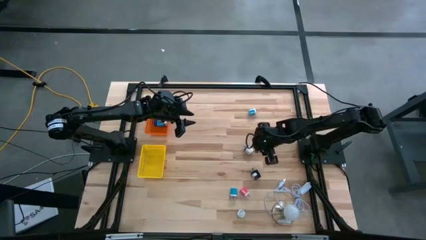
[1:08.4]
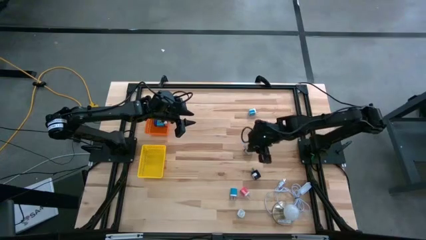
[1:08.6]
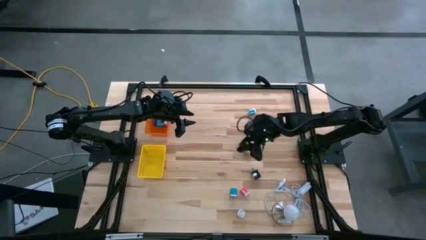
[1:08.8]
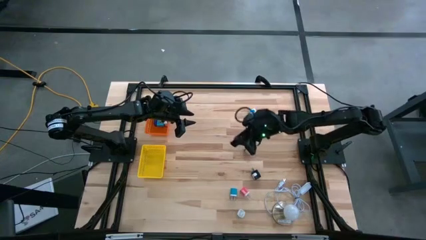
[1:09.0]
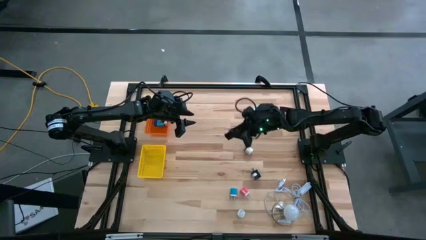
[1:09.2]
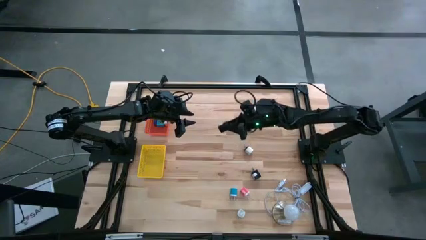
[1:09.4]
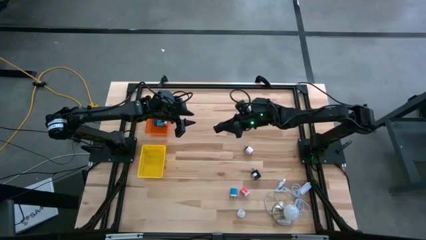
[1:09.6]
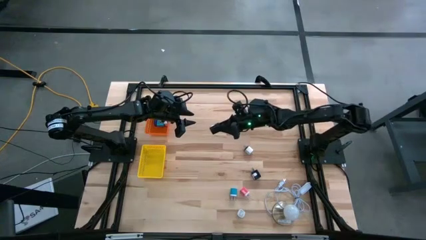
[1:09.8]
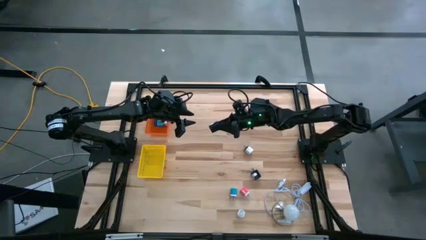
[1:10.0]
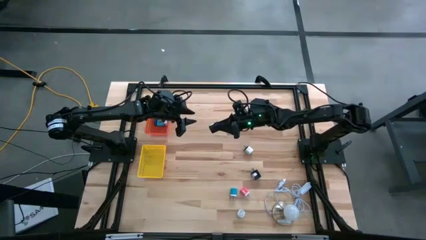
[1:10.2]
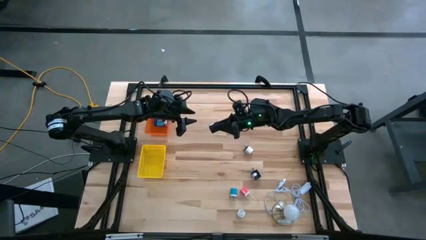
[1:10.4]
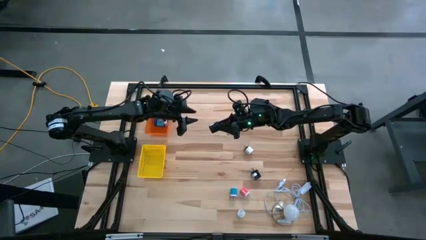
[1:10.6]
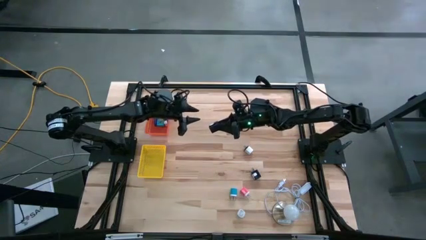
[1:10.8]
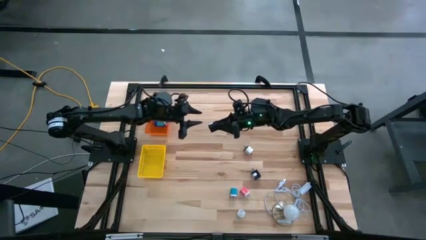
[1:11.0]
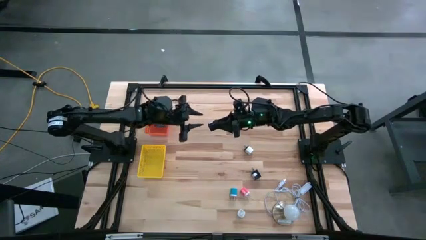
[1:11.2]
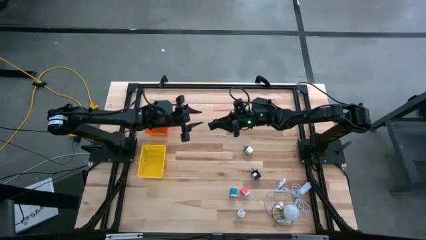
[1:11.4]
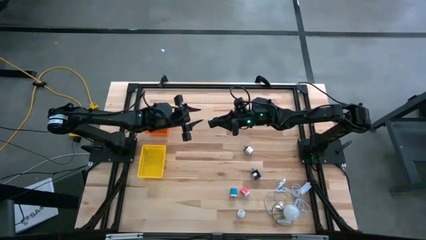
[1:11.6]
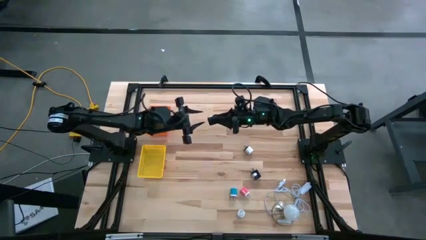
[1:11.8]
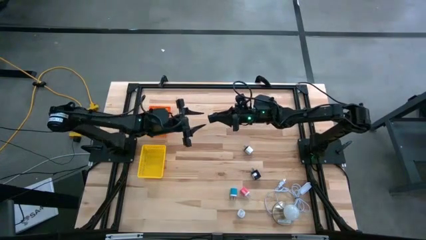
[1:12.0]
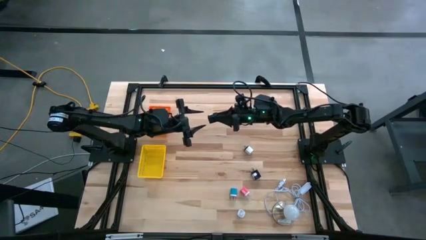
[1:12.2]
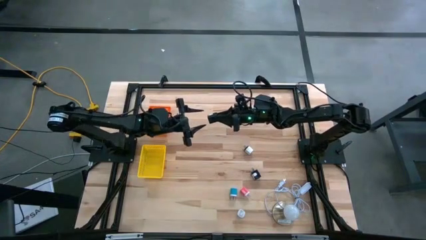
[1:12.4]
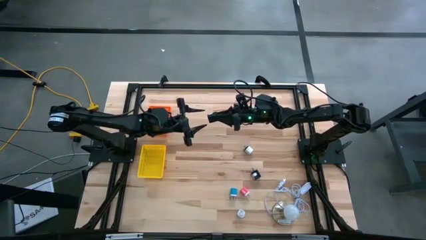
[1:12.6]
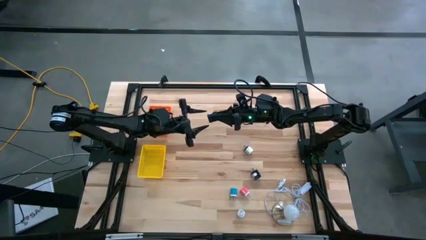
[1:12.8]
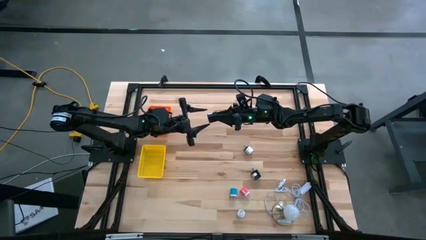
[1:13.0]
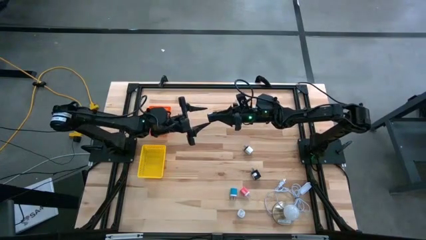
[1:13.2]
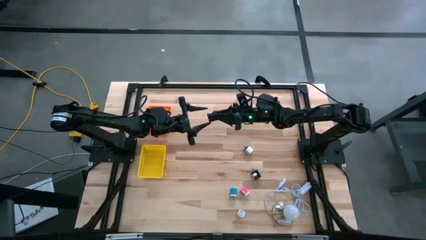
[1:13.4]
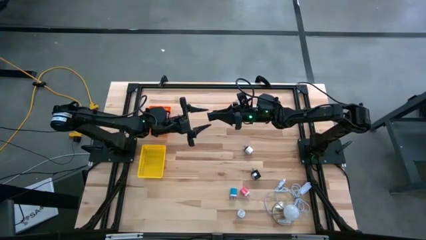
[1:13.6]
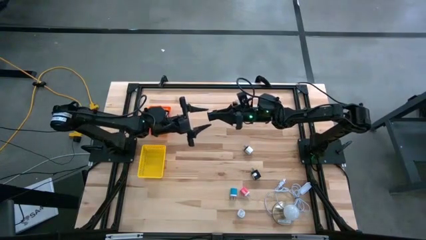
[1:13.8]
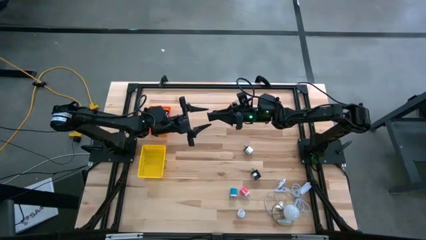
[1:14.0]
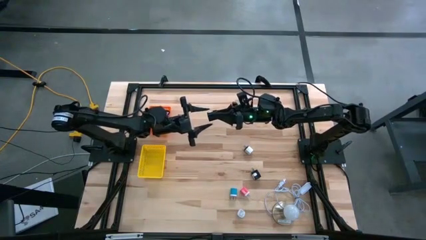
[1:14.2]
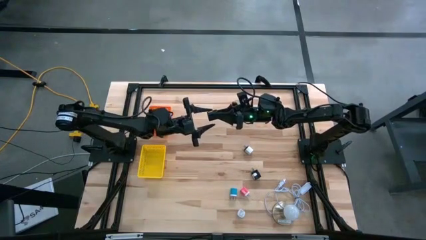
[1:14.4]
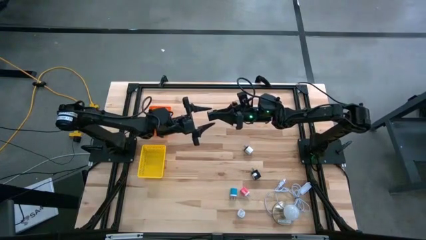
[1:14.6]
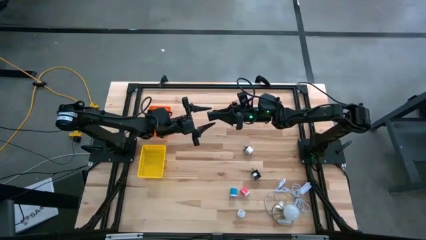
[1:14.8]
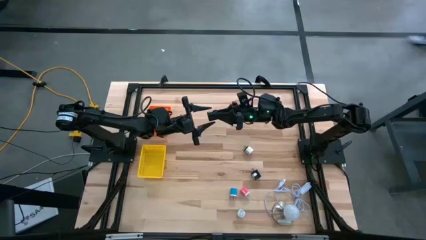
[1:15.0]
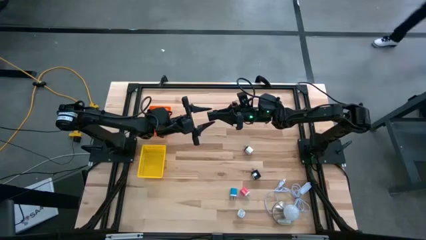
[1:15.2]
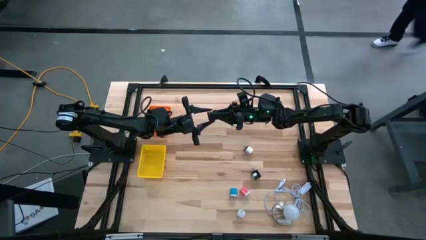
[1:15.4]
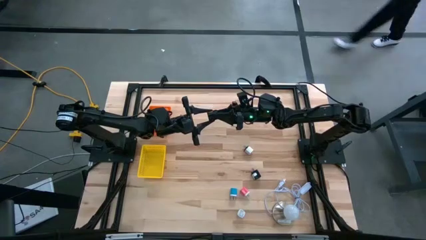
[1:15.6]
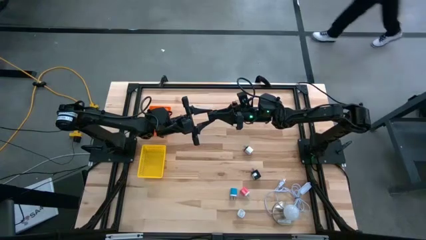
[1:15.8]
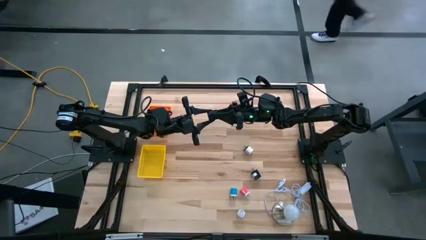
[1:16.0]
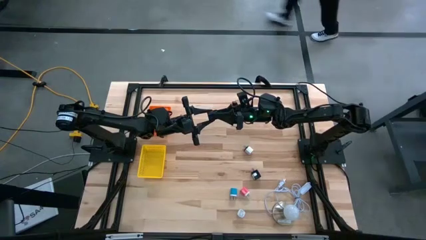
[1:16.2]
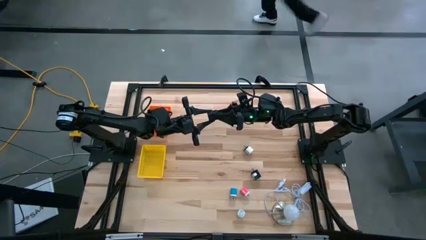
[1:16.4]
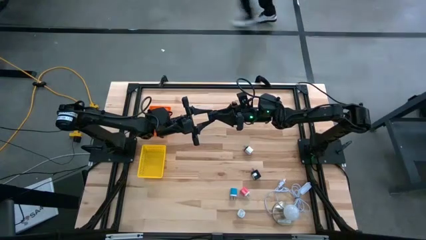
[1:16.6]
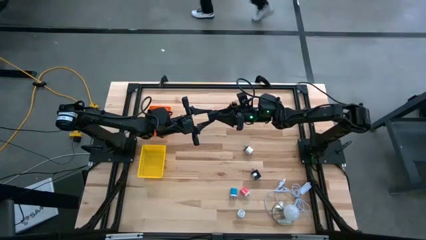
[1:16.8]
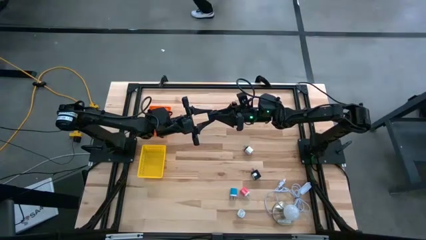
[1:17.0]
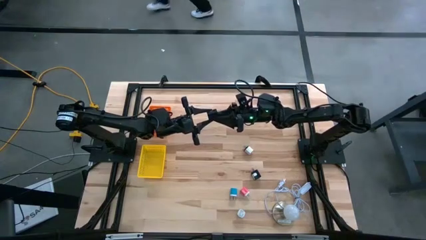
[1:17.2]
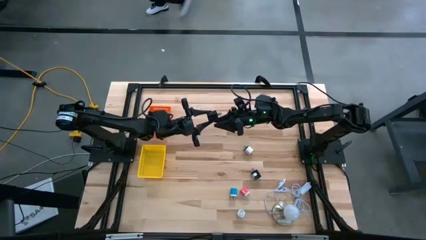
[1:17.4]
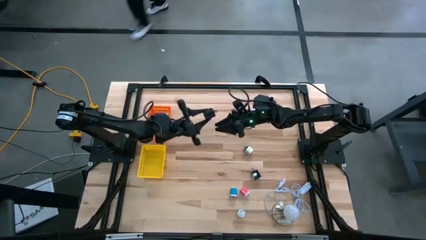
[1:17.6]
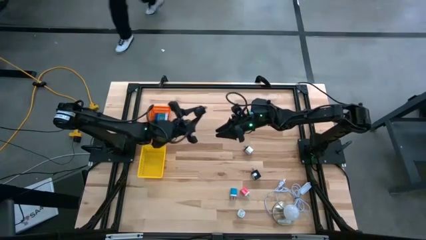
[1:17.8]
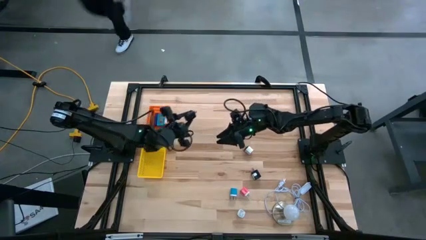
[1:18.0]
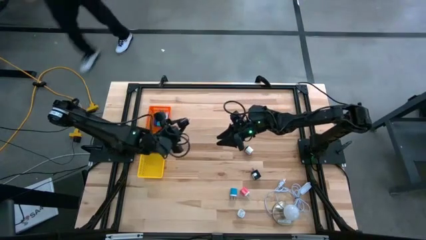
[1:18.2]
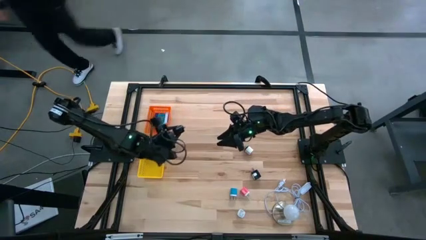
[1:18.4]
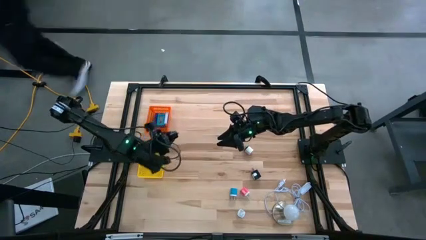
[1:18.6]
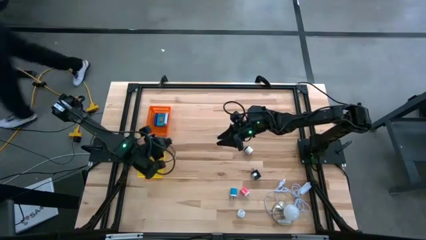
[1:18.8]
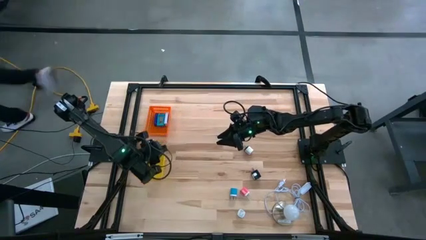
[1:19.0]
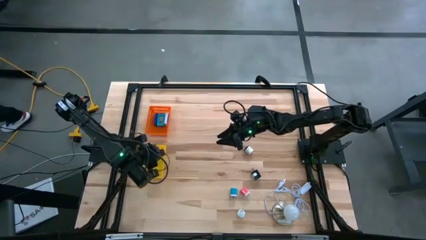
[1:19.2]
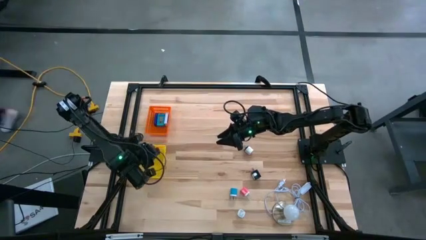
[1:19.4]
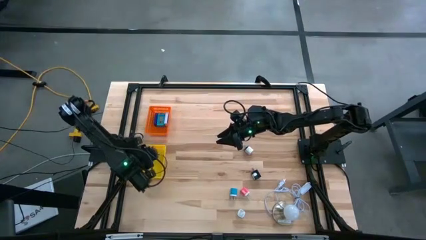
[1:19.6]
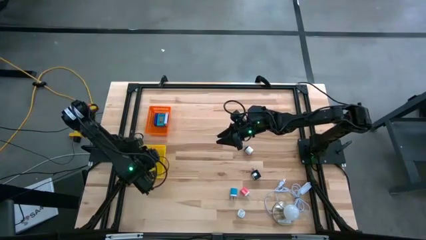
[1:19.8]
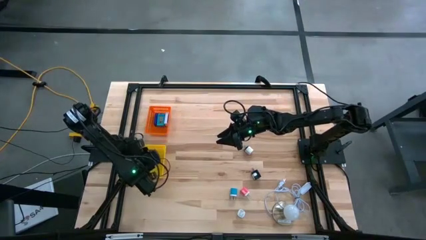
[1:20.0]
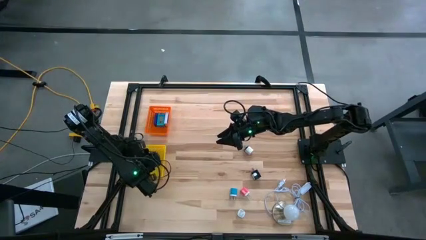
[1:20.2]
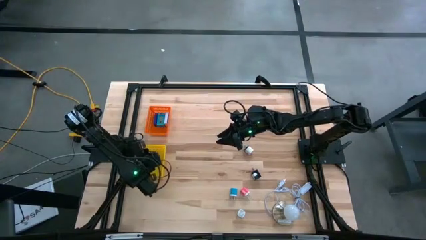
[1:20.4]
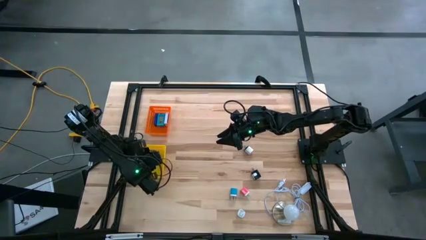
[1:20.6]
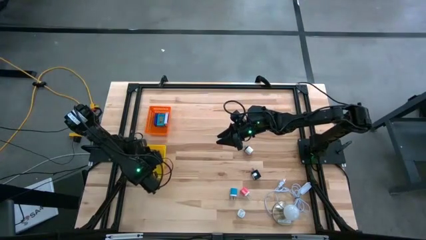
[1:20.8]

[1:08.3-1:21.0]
Task: Pick & Place Office items
Put the top black charger adapter into the yellow basket

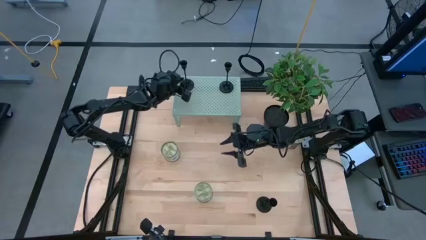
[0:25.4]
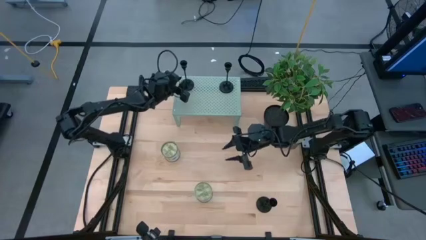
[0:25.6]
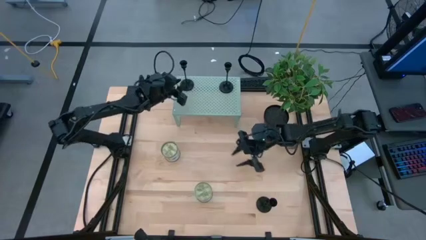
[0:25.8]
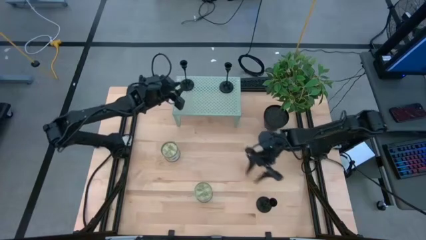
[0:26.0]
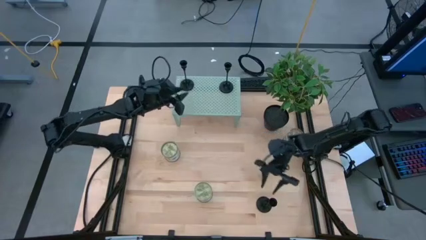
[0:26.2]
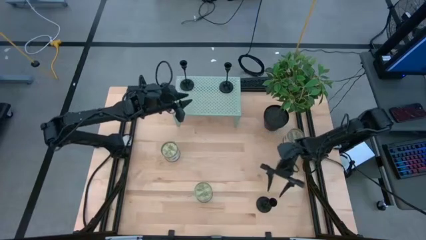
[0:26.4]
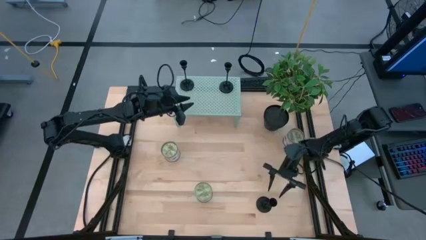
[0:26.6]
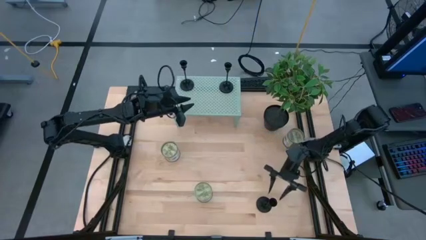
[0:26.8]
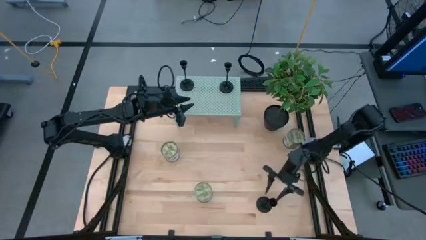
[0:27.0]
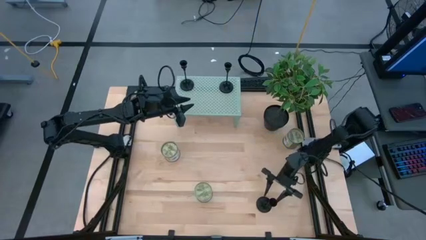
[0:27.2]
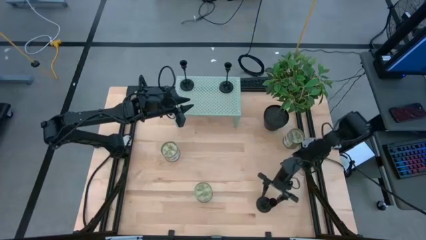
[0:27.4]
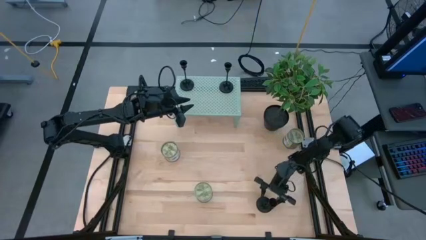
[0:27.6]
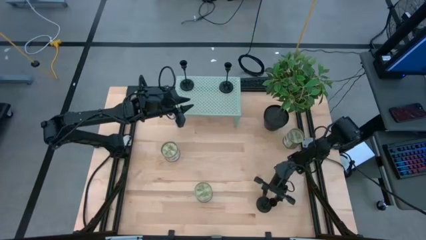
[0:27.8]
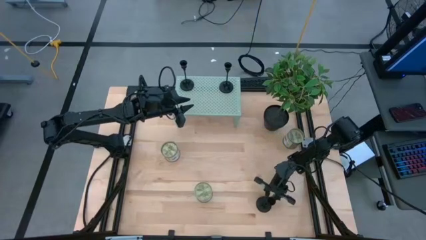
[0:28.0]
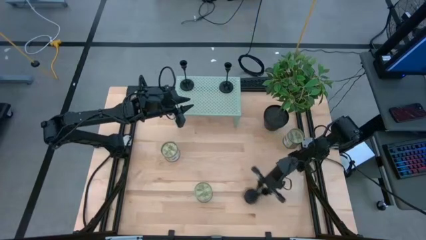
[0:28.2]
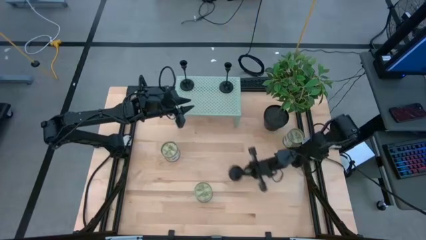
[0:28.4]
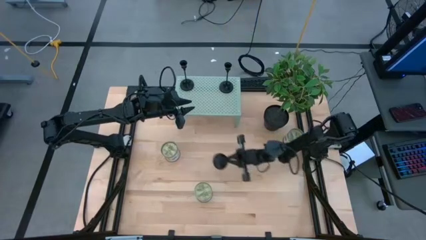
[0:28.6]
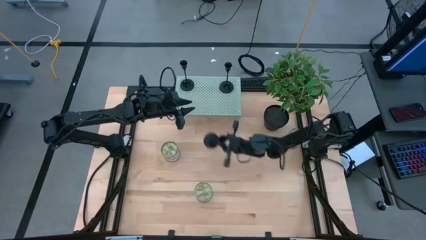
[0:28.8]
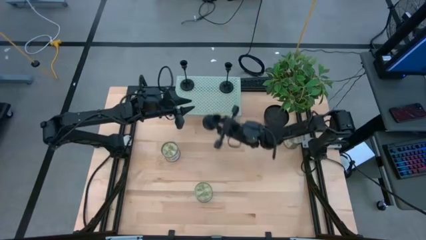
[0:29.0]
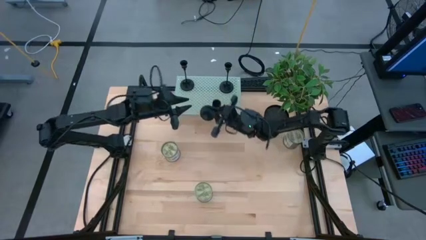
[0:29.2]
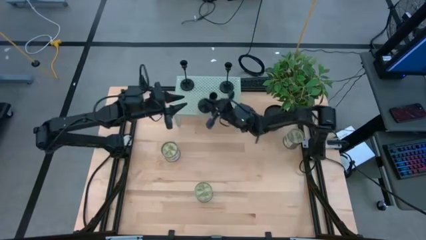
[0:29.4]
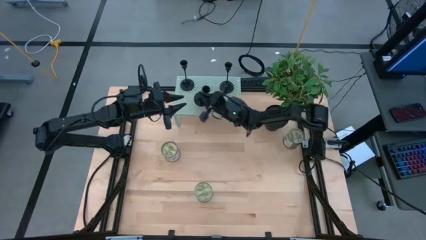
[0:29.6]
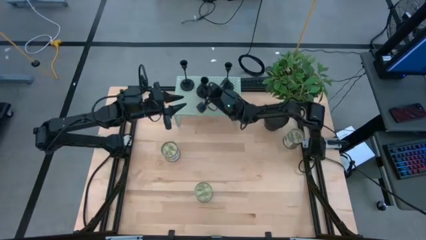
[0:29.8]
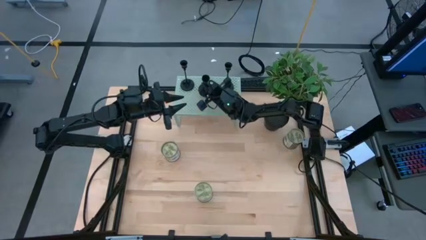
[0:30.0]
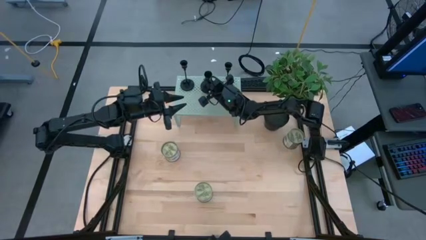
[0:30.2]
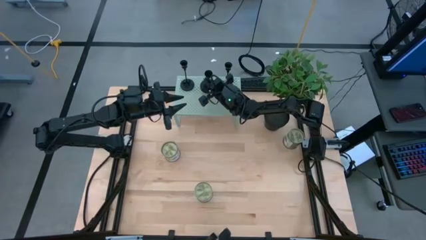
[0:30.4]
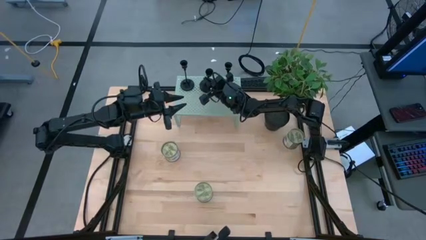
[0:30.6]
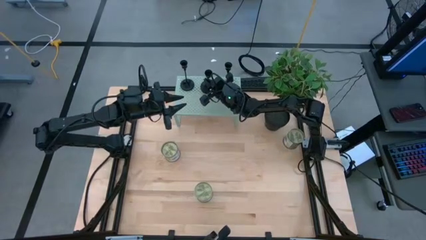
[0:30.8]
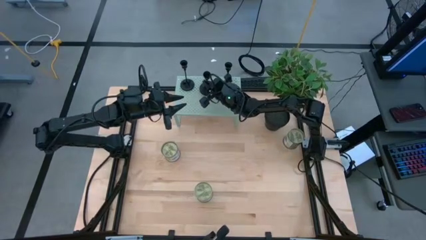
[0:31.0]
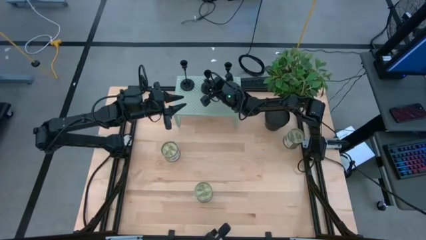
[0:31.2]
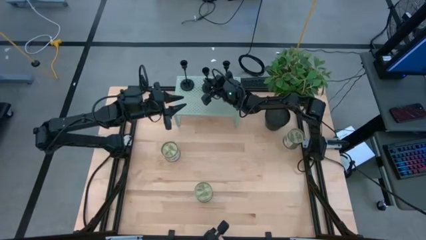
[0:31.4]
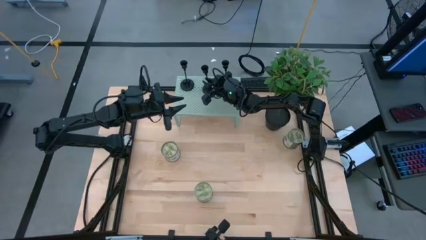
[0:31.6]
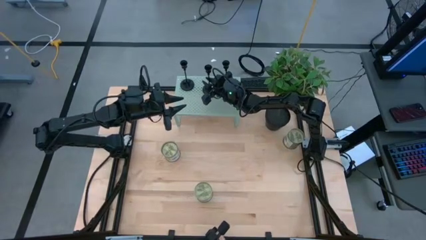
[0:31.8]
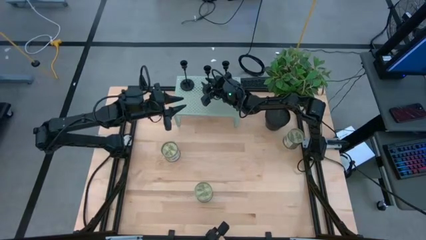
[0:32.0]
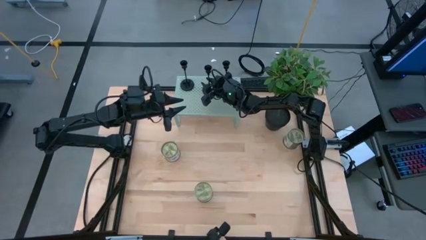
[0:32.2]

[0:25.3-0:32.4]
Task: Pick & Place candle stick holders
Put the candle holder on the shelf
